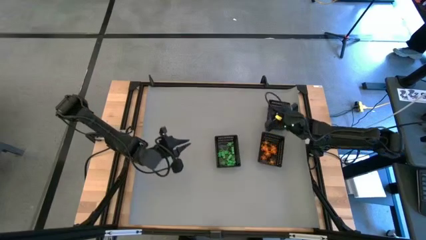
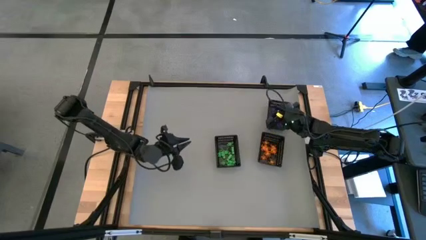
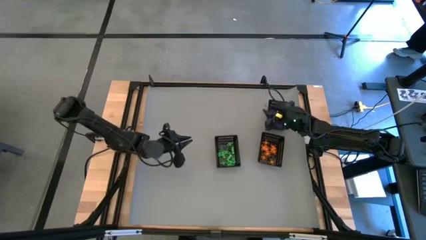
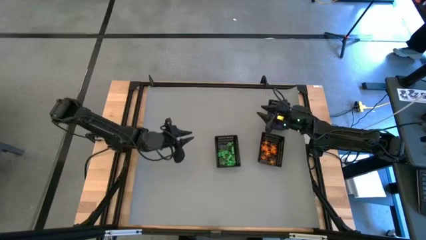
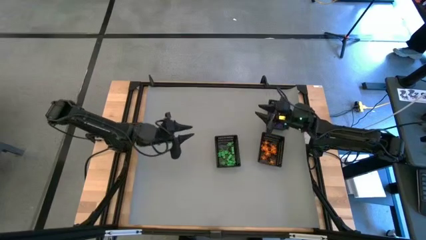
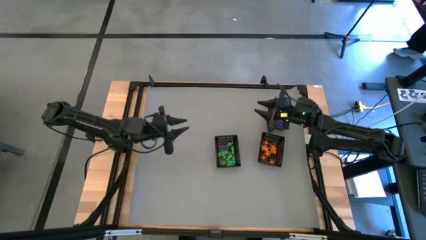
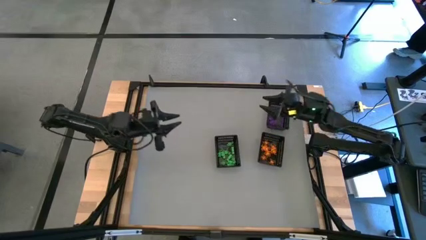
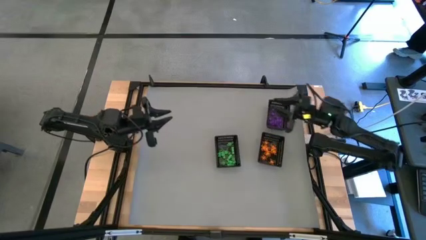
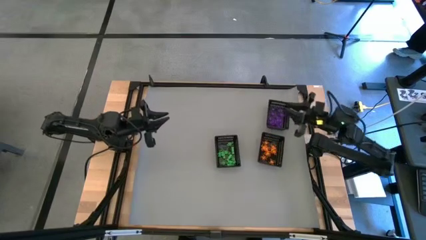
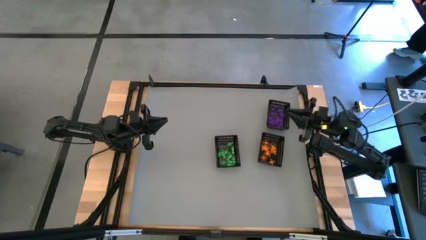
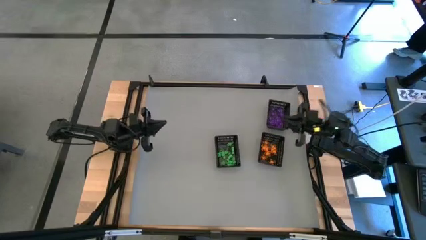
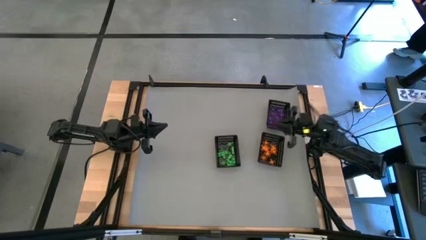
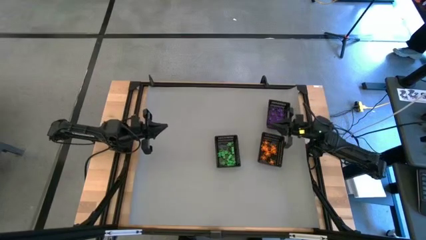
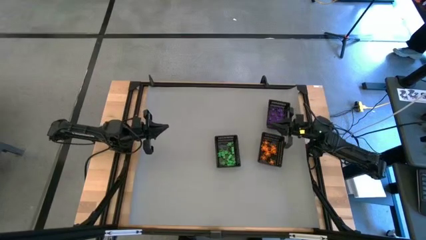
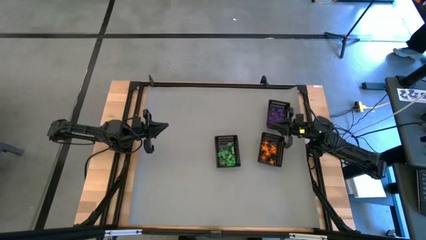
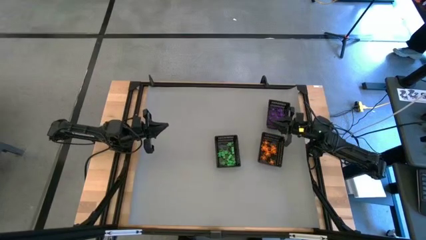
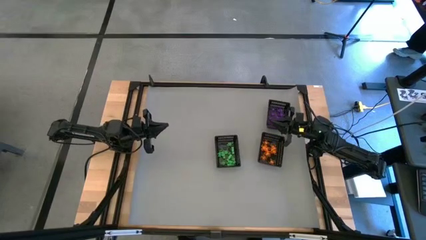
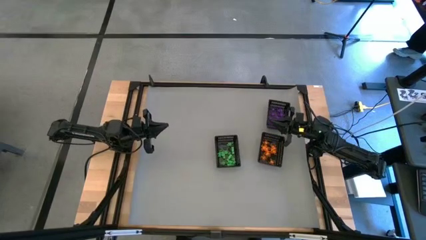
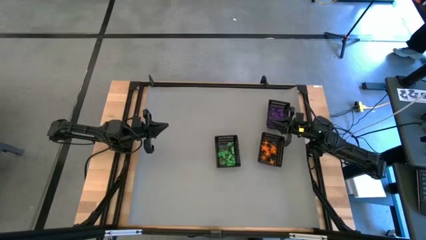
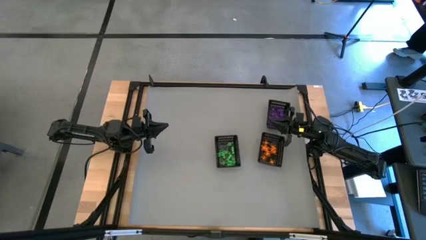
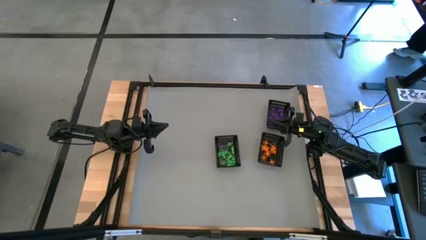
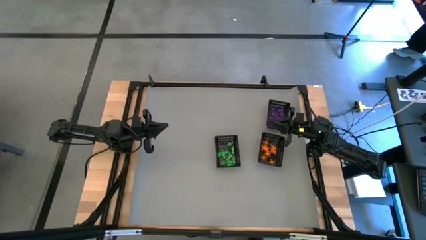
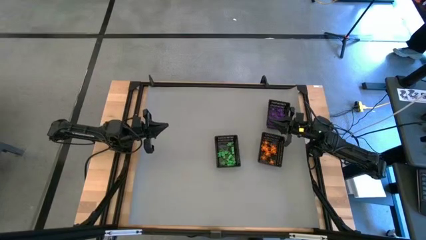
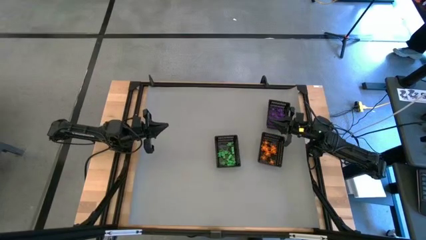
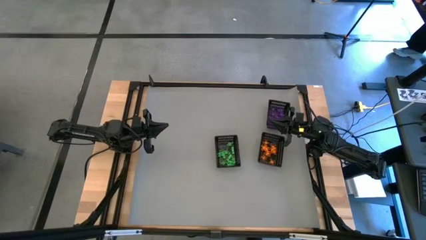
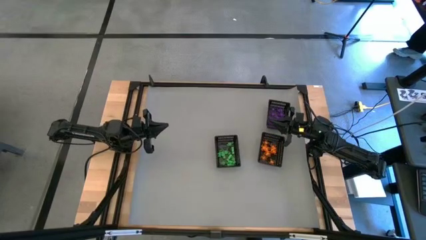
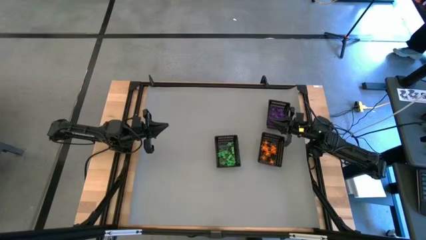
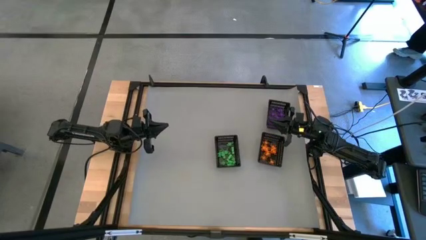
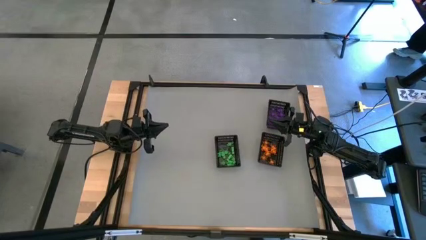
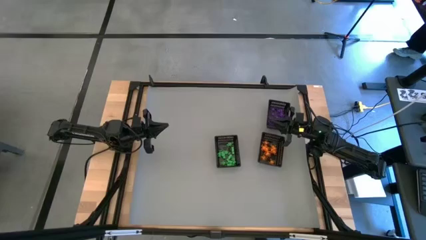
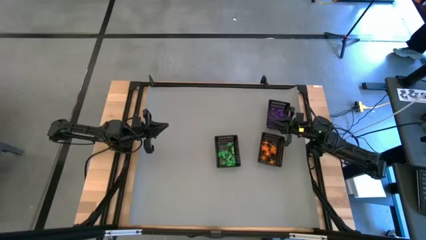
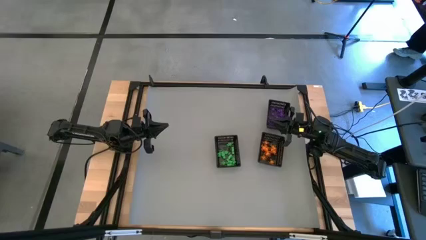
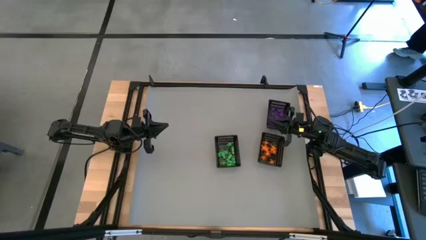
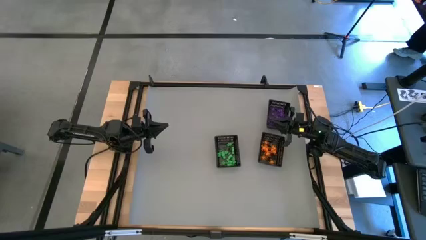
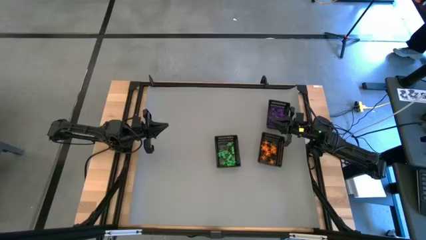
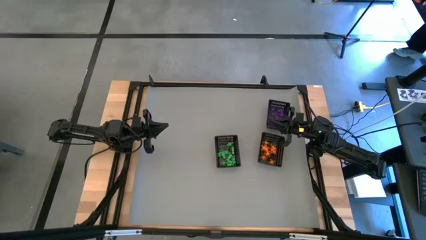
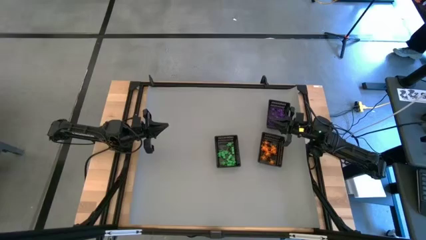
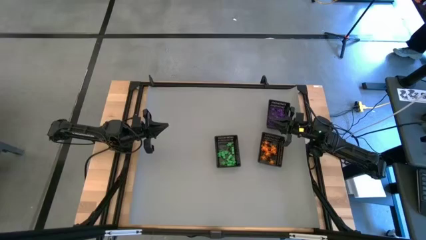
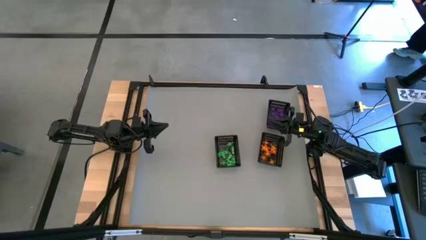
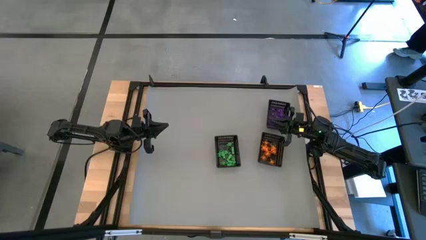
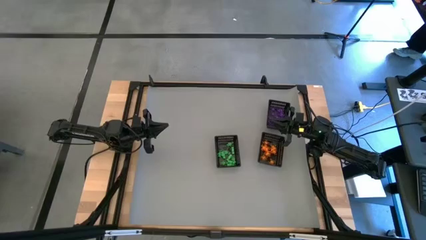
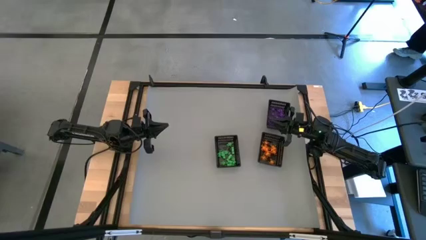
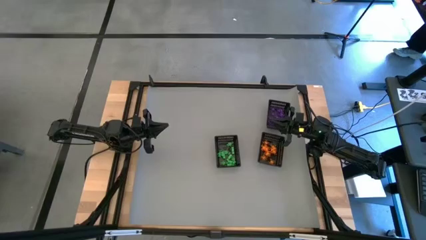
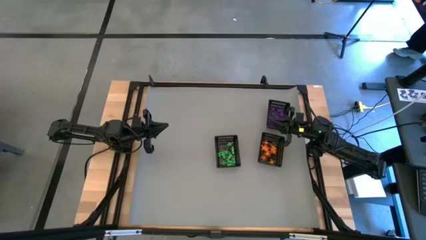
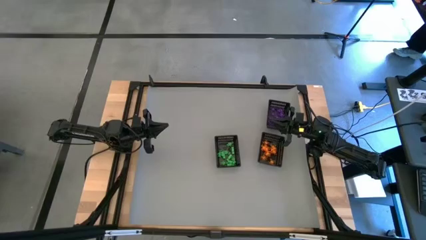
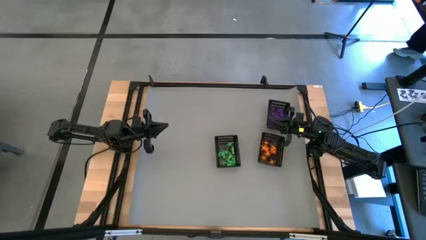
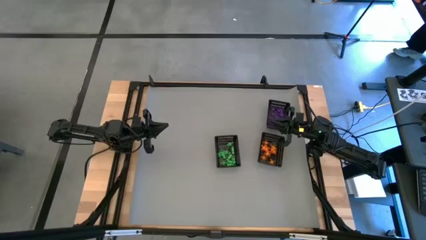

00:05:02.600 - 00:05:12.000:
Task: Sort Halloween decoration
Return to Home Position

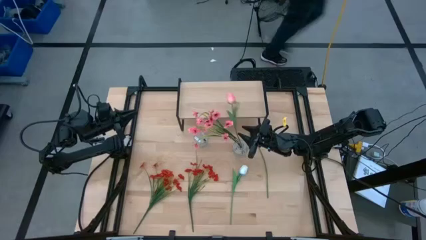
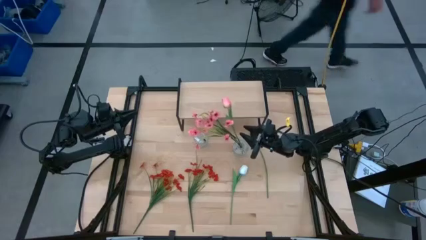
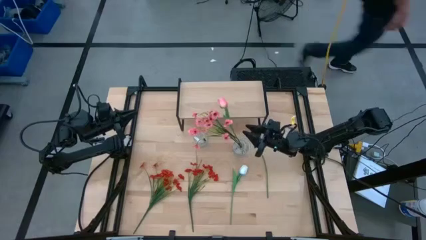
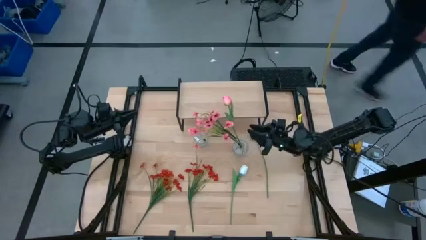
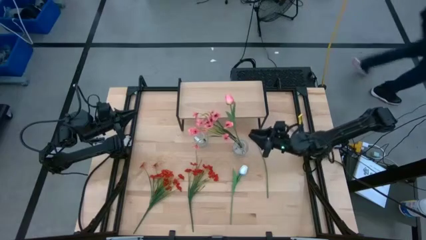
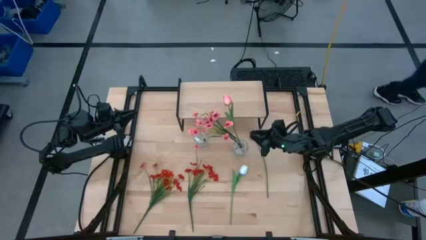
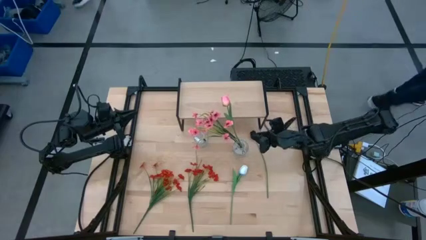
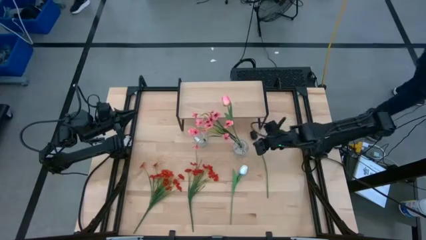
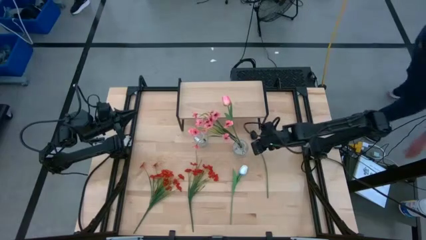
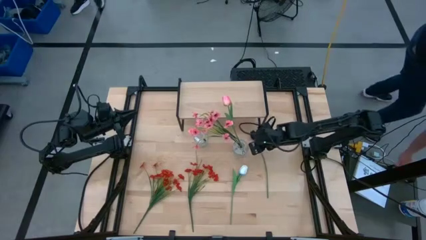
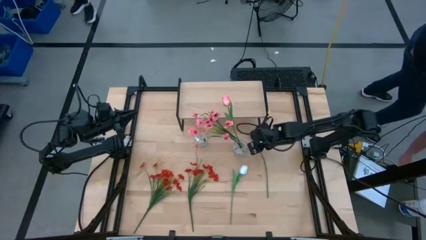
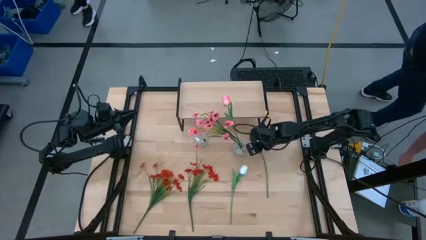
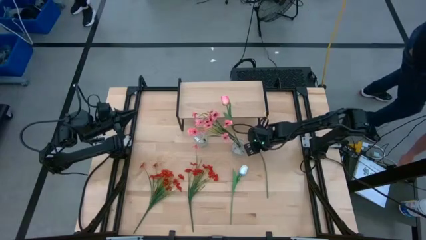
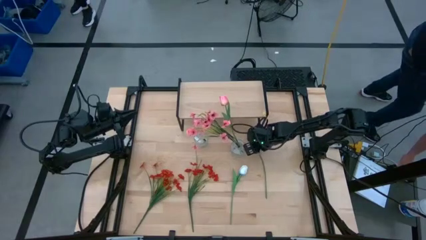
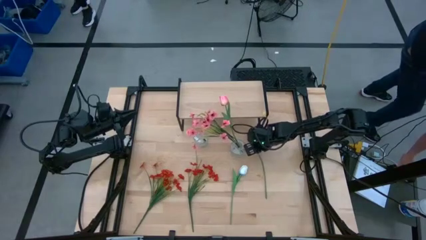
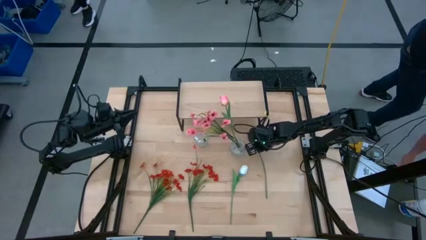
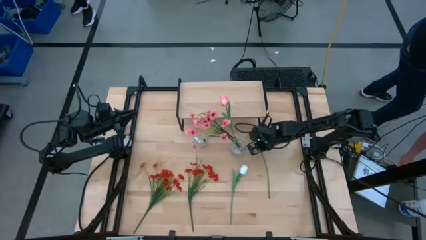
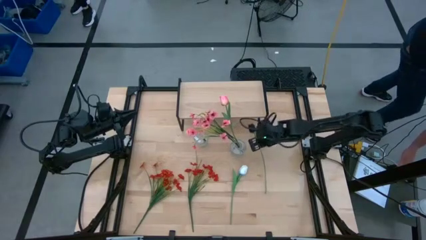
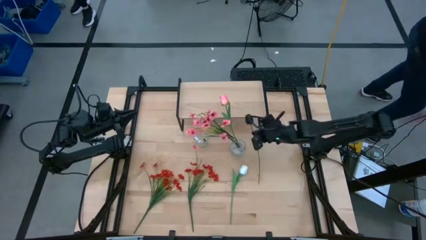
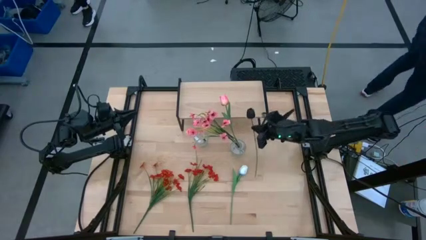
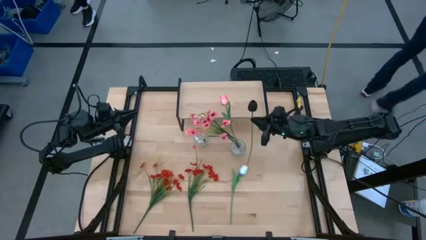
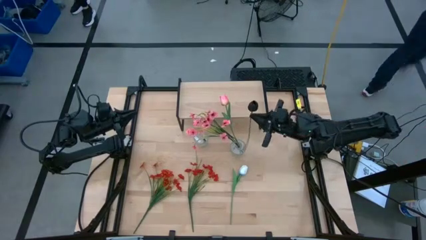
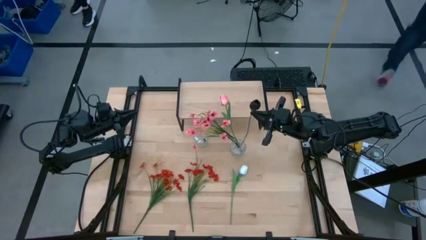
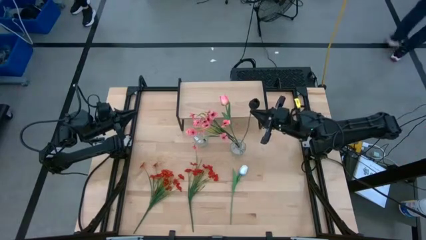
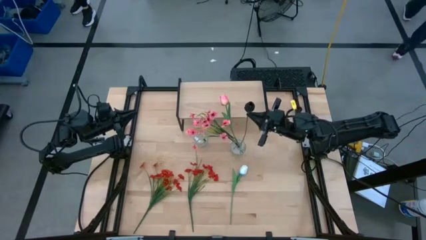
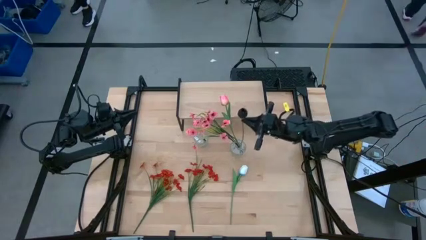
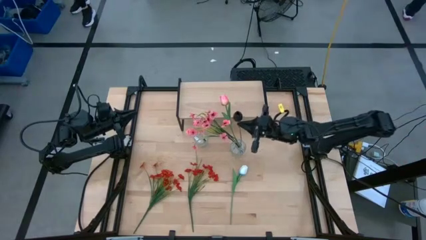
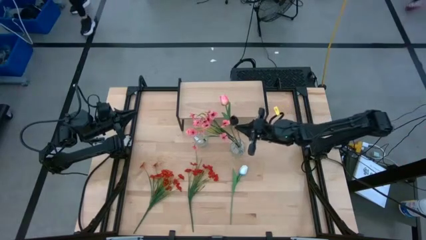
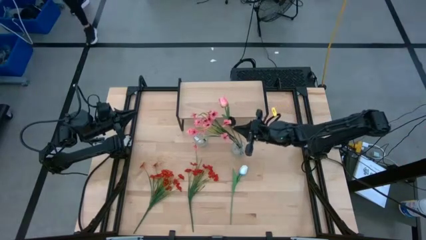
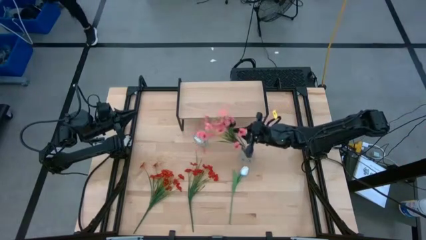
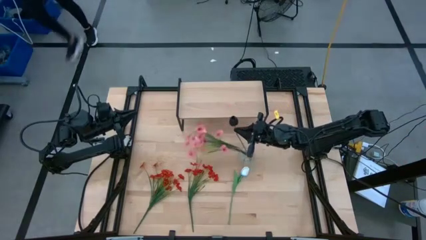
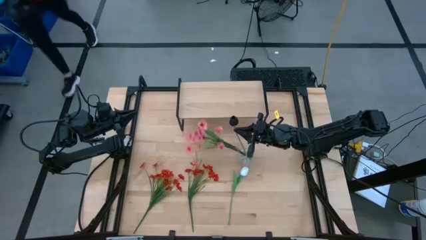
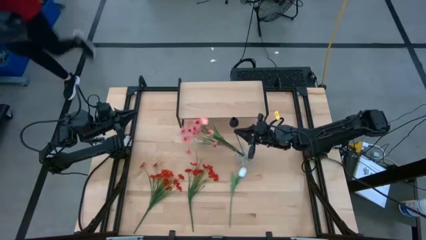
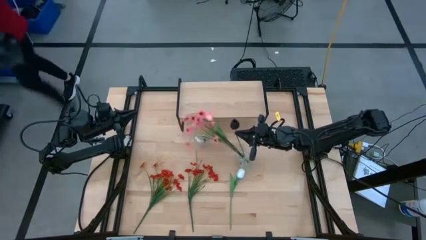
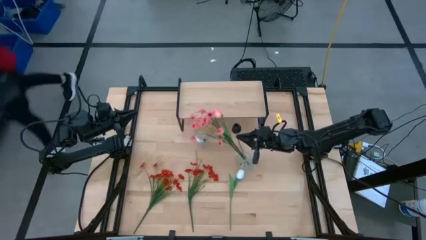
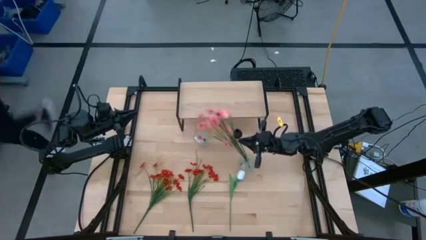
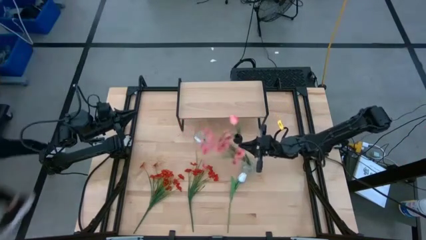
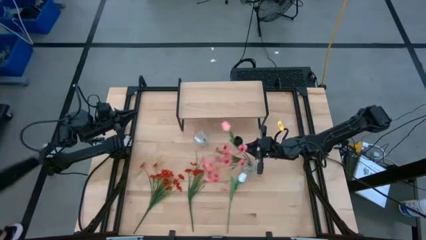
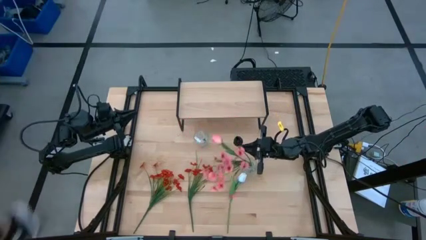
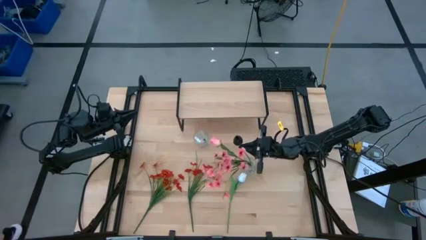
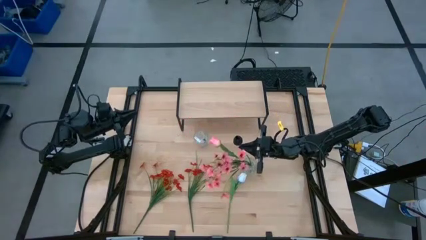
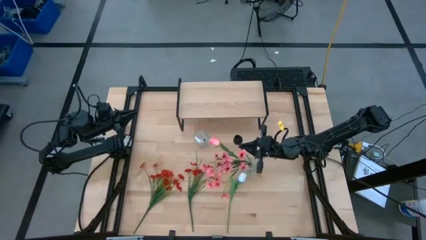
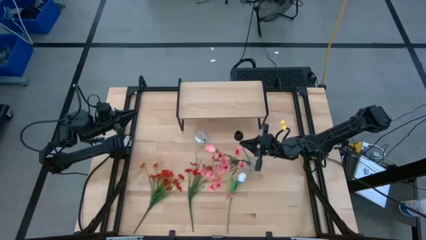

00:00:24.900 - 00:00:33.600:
Task: Pick and place flowers into a vace then onto a shelf
Put the black tulip into the right transparent vase
